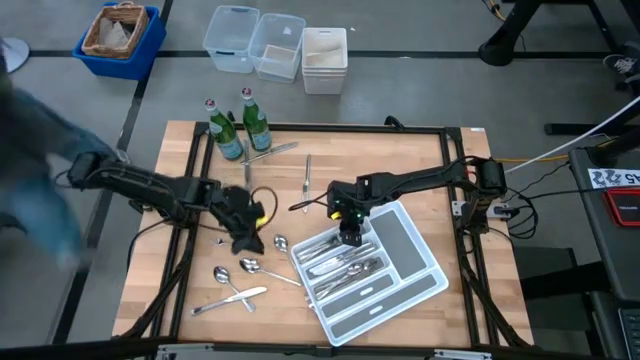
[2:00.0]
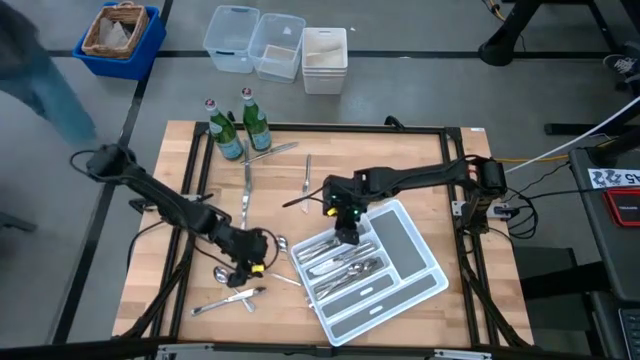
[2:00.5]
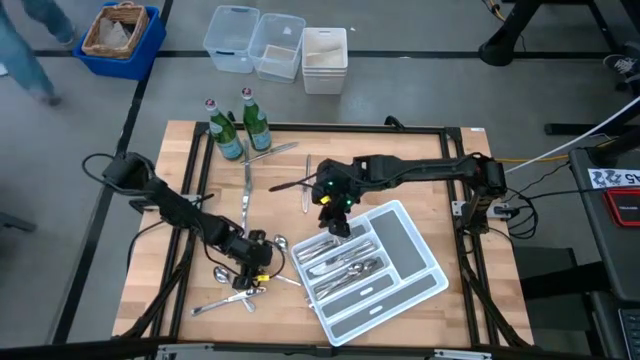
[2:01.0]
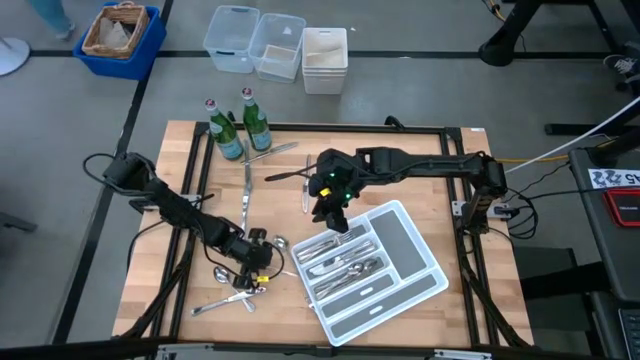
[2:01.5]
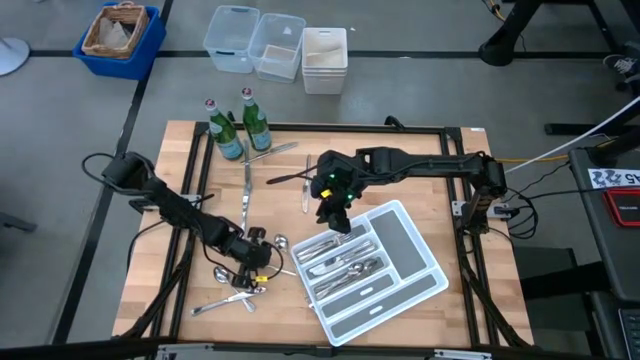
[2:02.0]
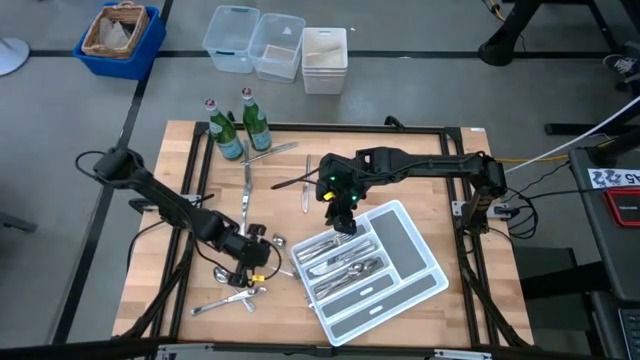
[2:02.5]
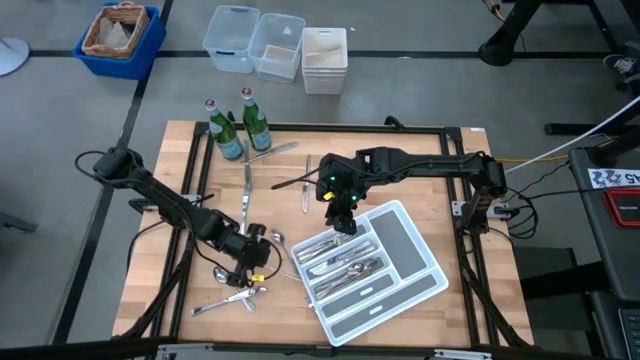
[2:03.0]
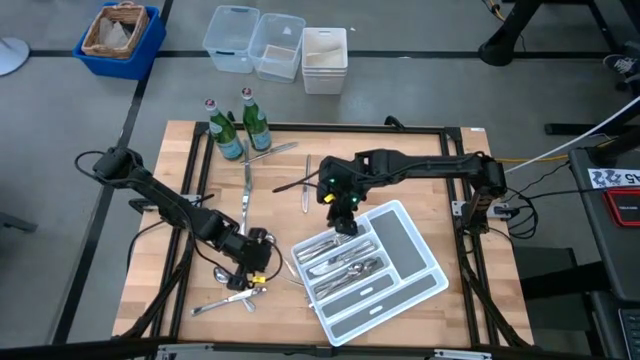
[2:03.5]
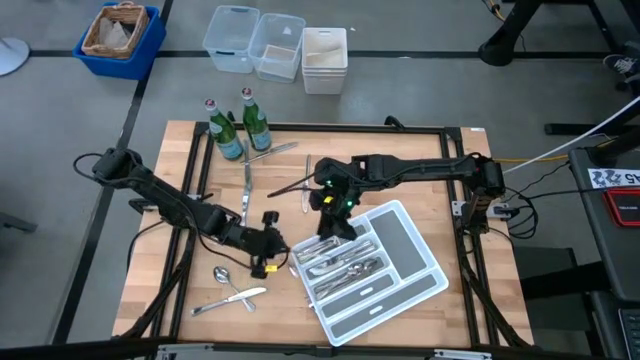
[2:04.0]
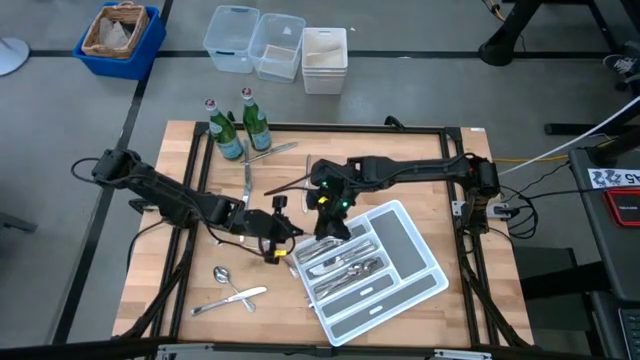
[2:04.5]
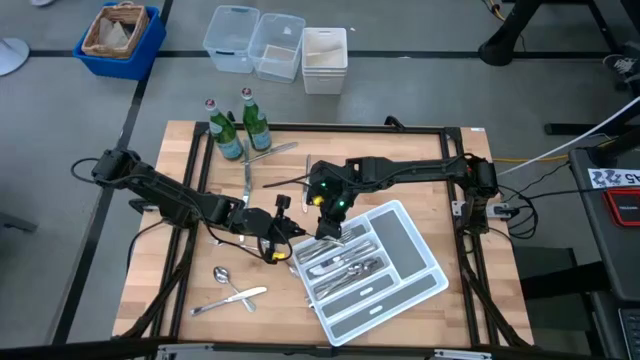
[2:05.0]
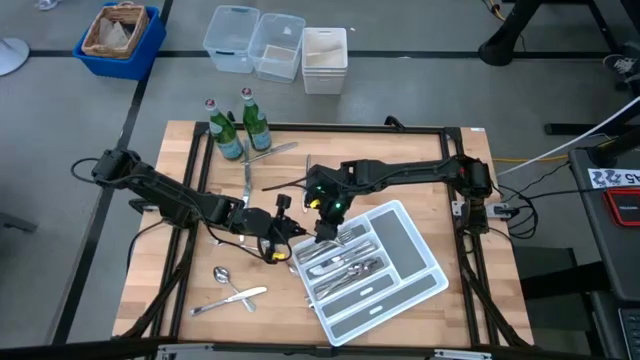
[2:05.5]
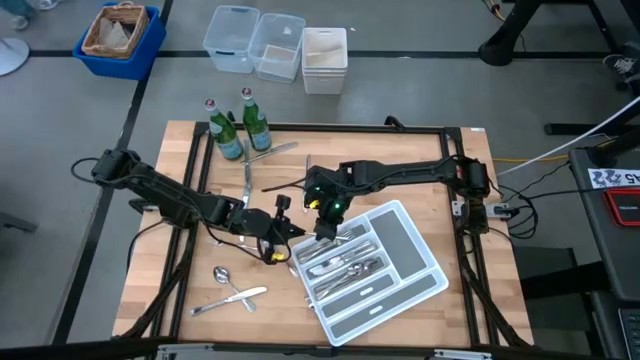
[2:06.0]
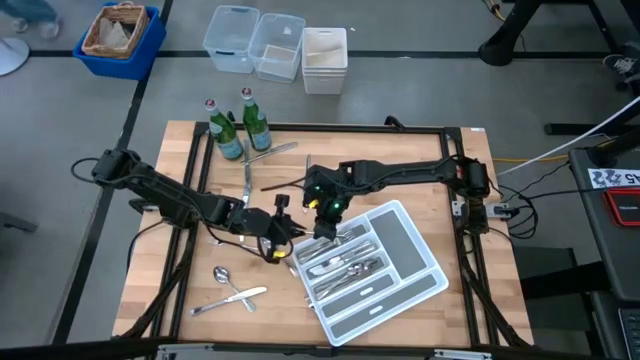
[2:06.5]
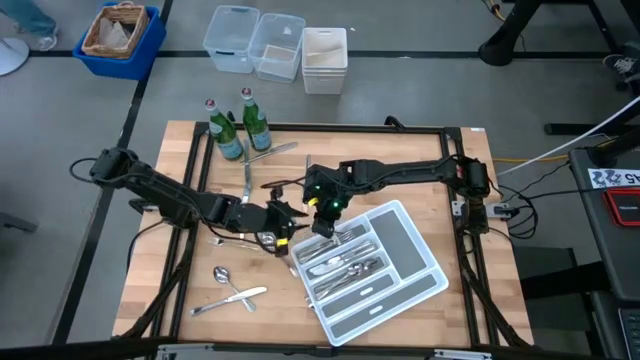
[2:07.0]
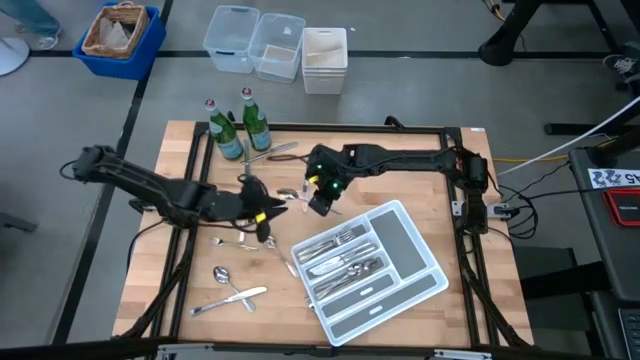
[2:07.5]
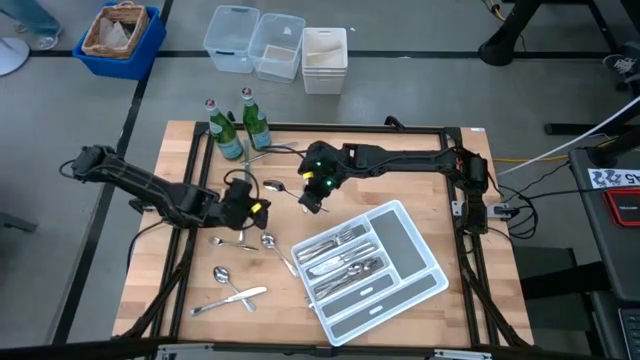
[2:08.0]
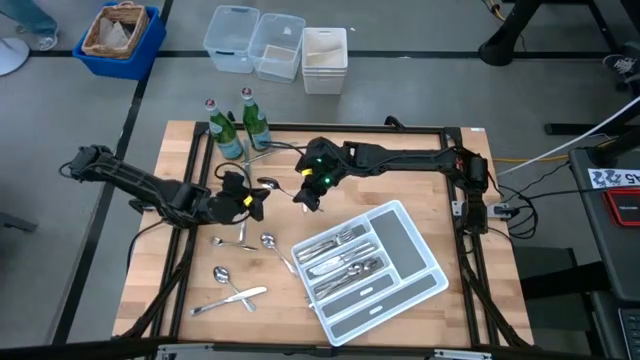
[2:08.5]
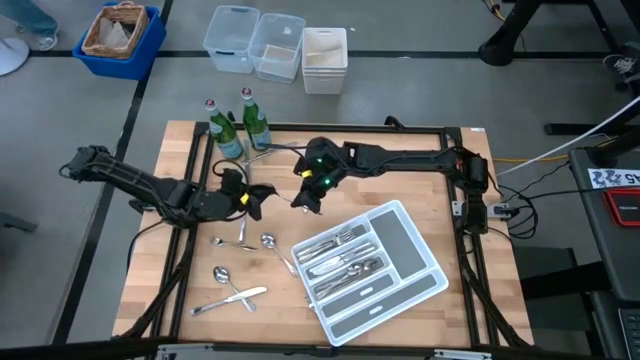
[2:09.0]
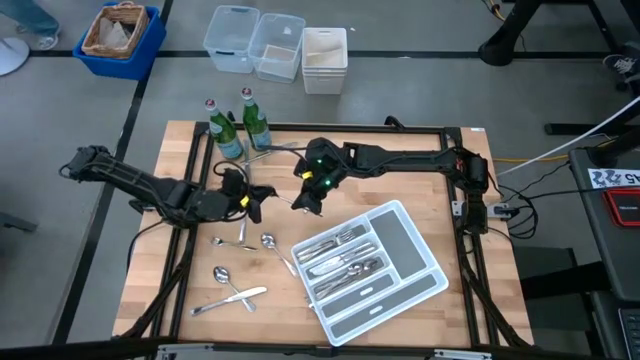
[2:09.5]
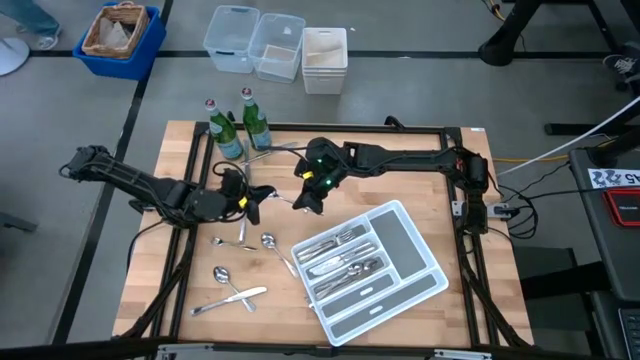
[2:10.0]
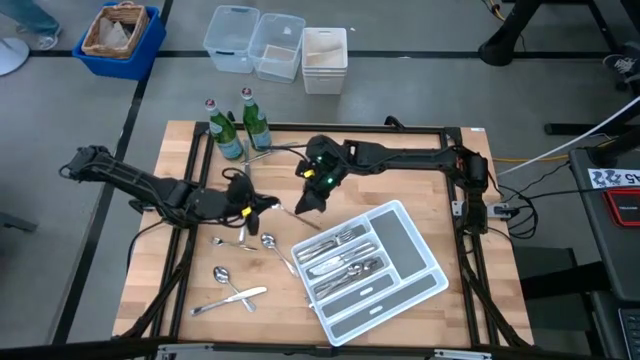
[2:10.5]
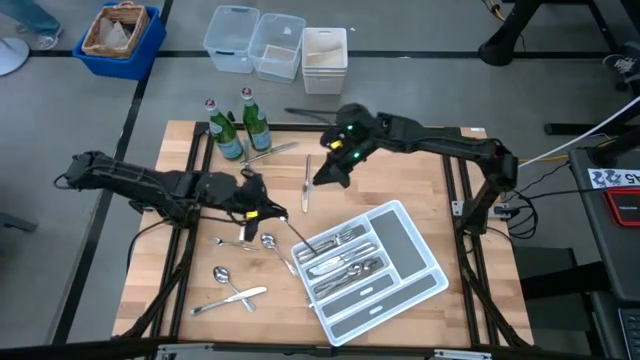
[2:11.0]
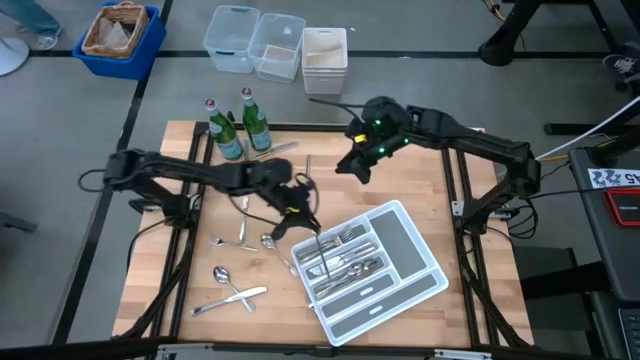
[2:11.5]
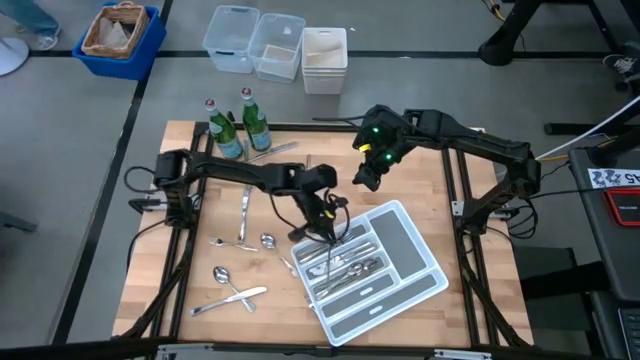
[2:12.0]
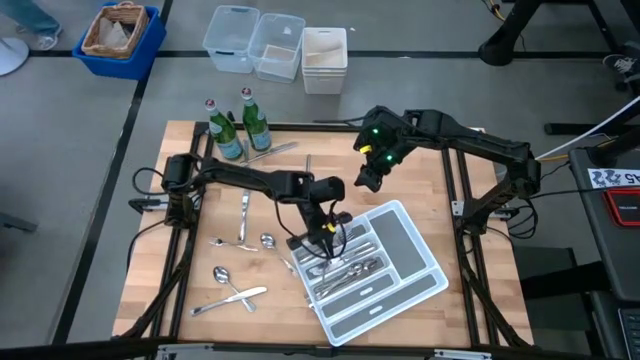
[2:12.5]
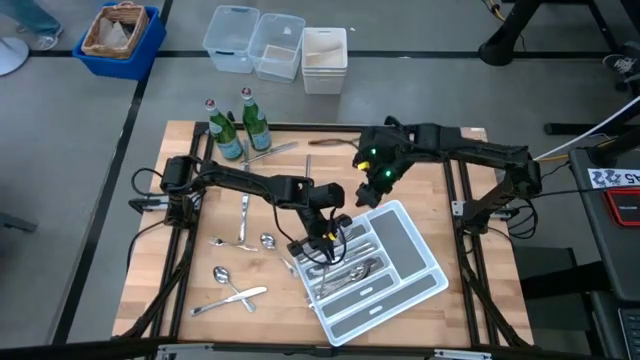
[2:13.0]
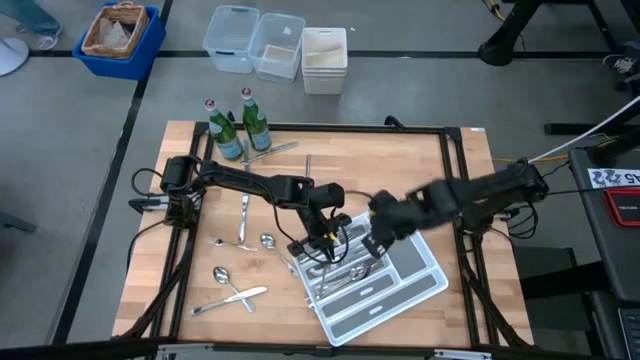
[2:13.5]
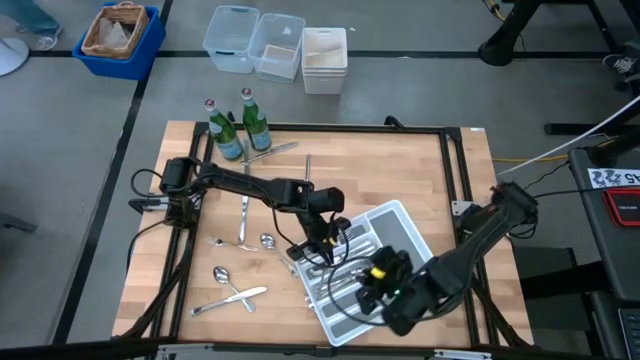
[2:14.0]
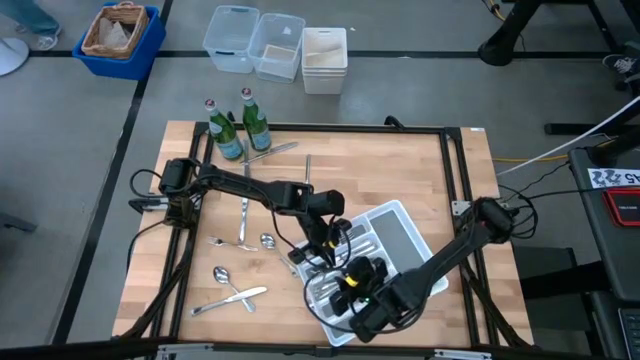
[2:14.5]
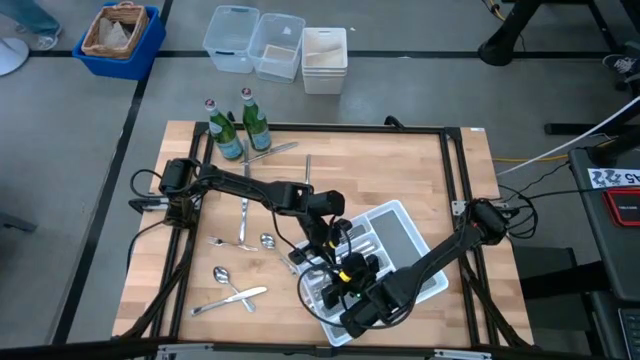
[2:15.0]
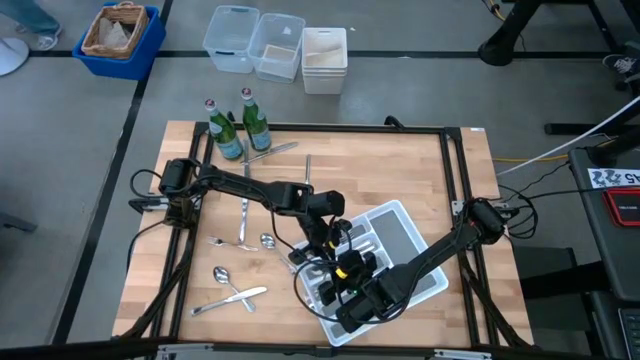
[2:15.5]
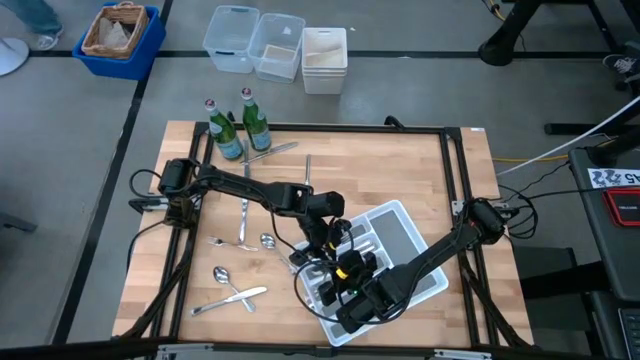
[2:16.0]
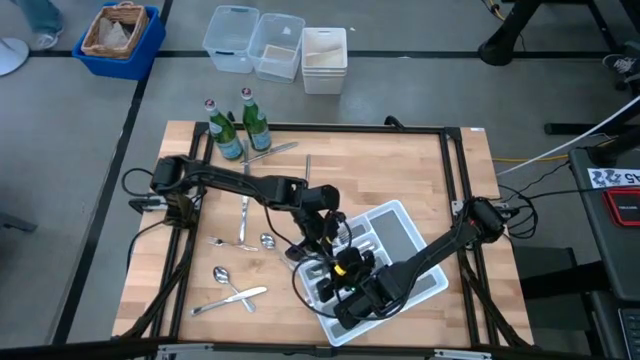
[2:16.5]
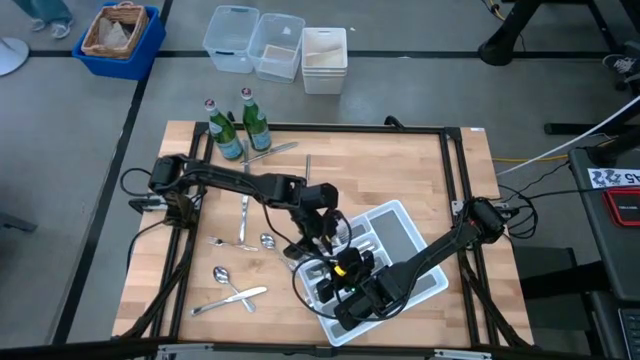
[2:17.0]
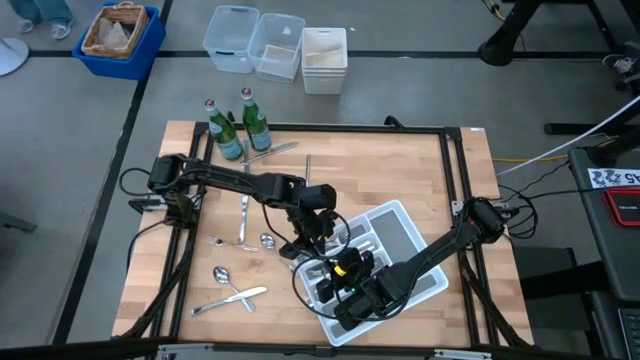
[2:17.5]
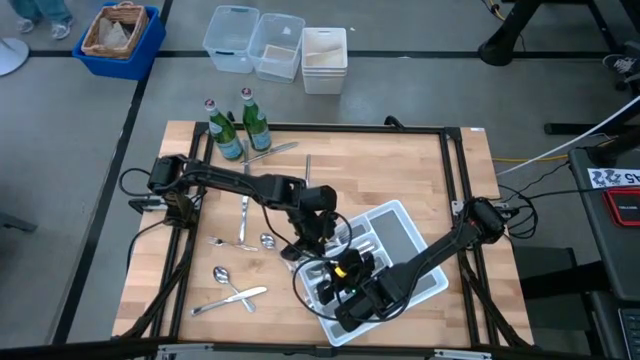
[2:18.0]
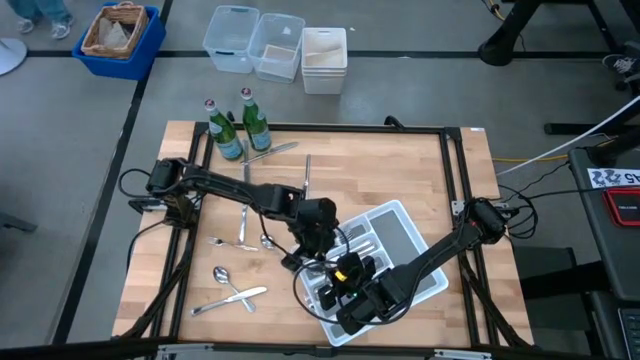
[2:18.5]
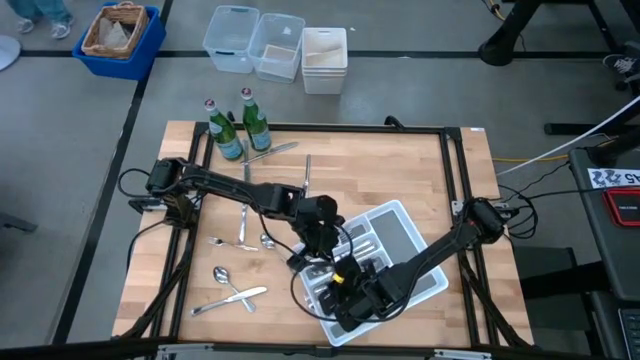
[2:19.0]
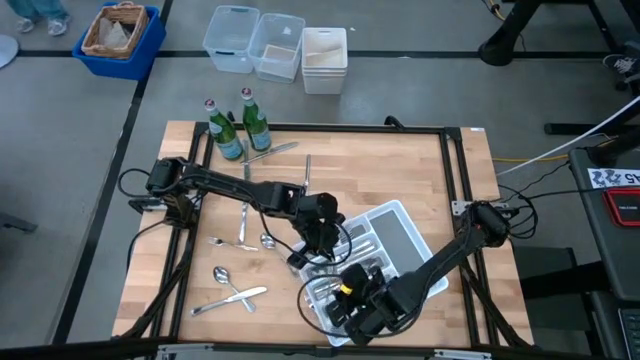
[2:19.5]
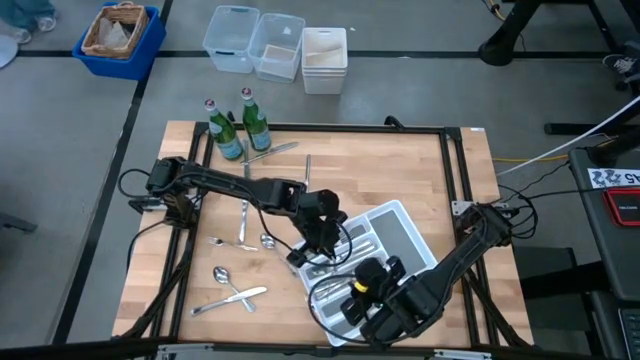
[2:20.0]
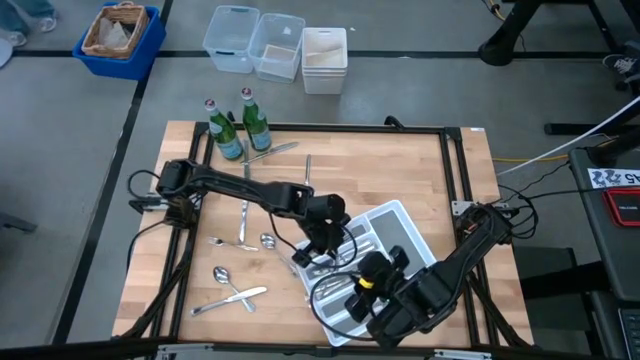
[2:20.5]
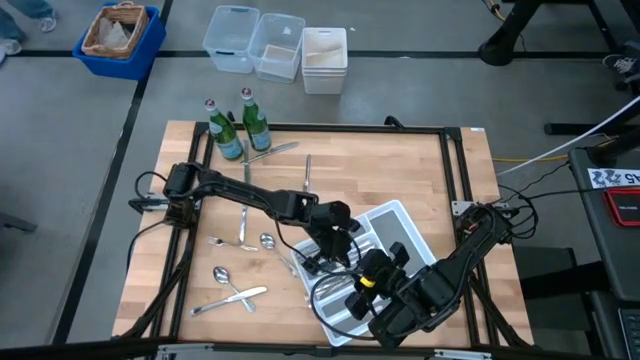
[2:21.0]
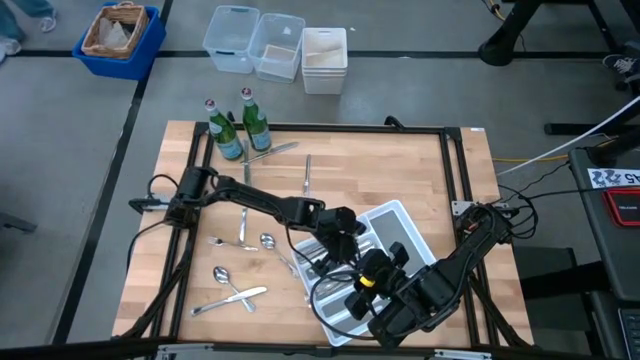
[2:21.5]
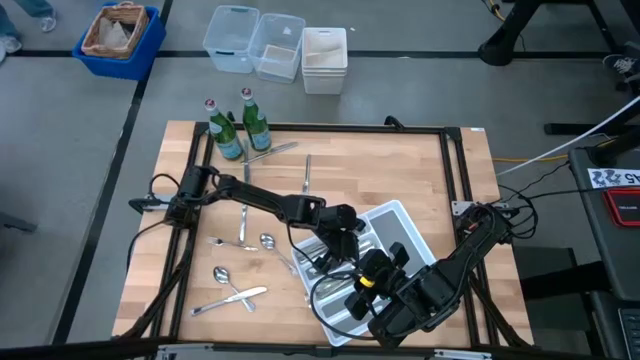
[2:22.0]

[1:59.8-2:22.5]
Task: Sort silverware
Put the silver spoon into the white silverware tray
